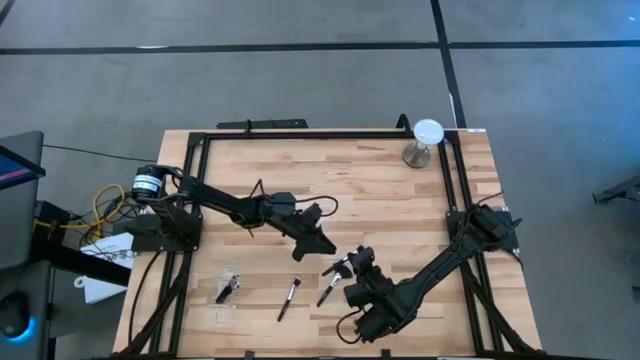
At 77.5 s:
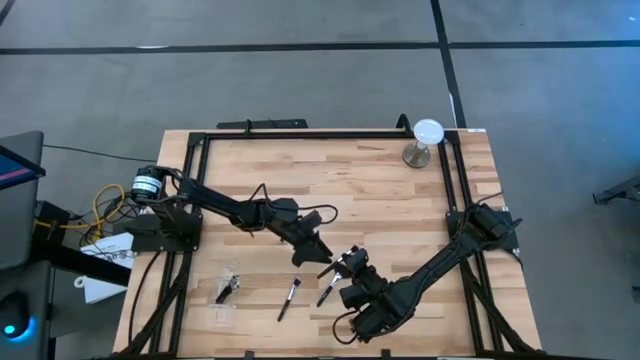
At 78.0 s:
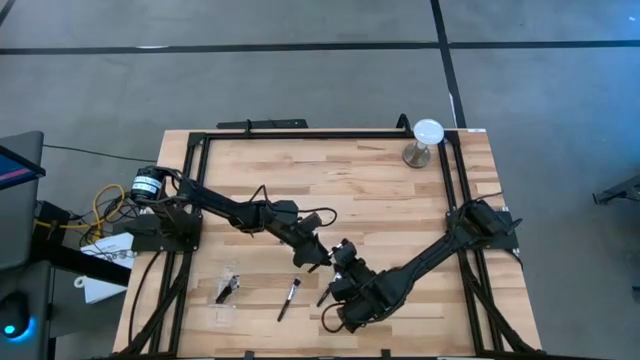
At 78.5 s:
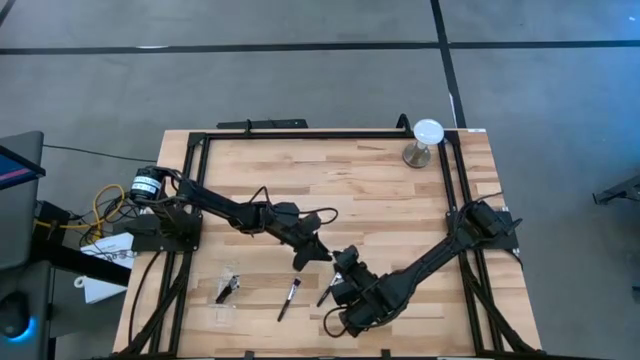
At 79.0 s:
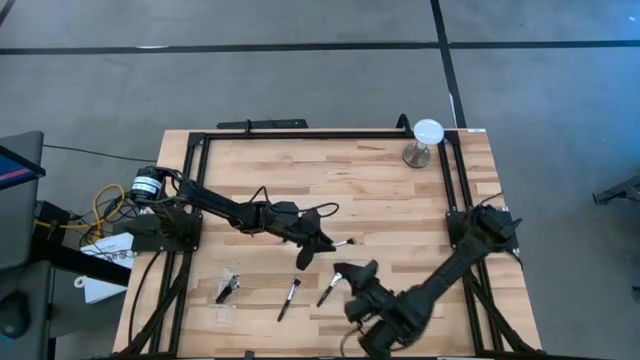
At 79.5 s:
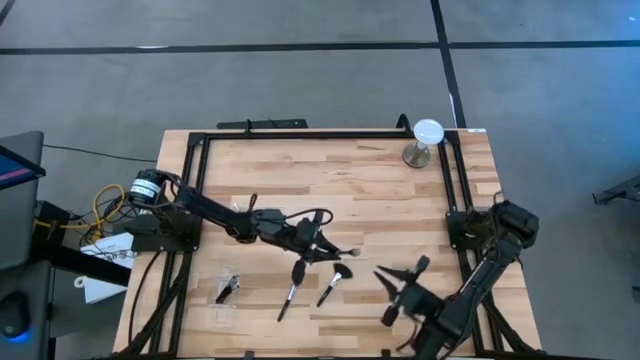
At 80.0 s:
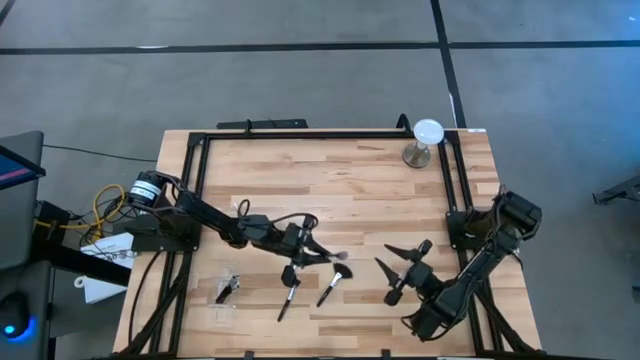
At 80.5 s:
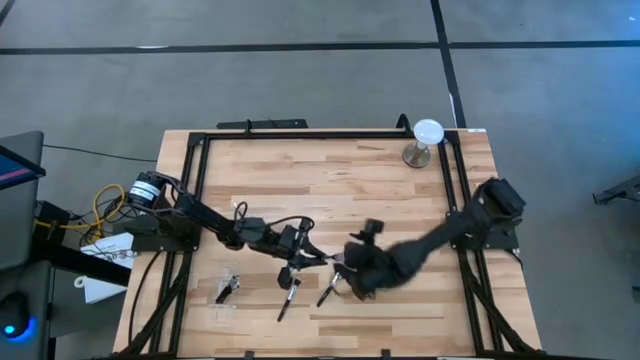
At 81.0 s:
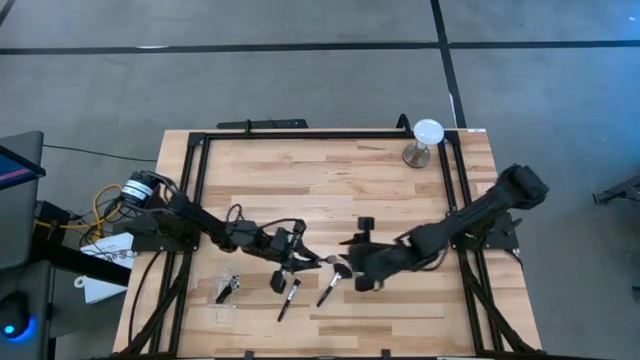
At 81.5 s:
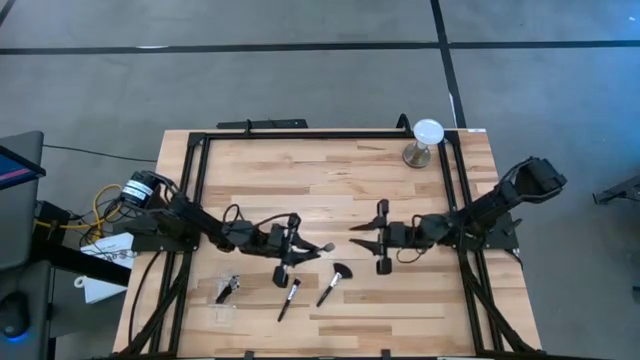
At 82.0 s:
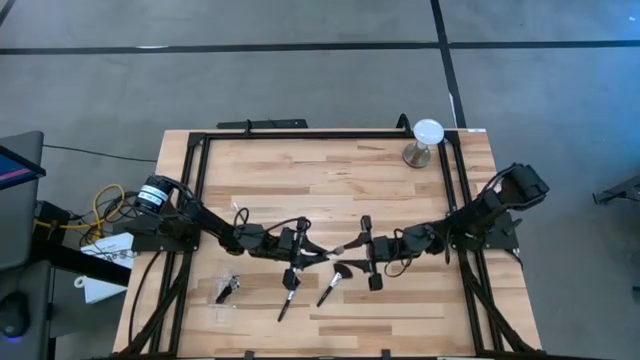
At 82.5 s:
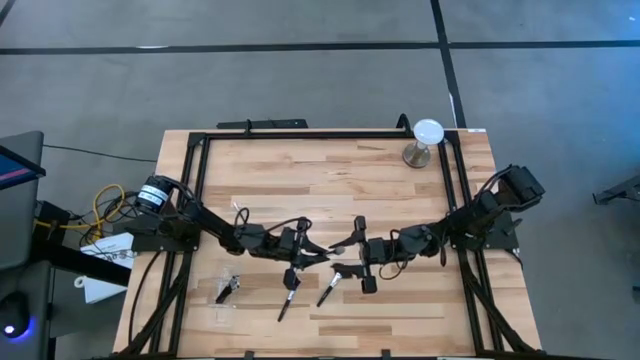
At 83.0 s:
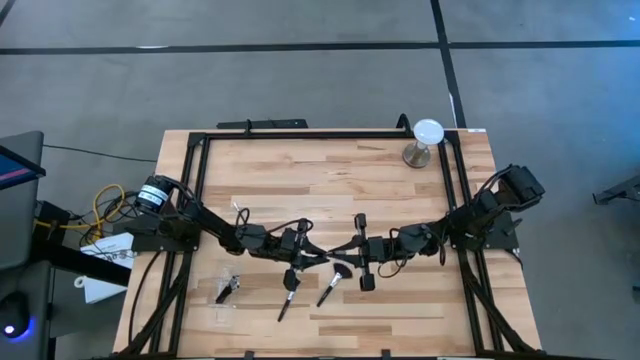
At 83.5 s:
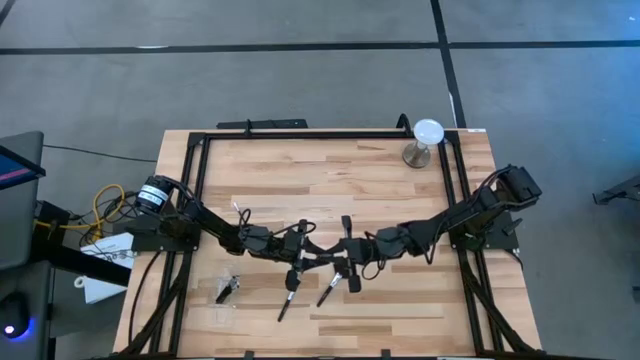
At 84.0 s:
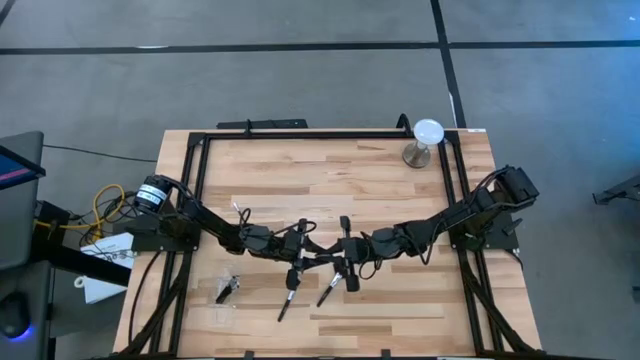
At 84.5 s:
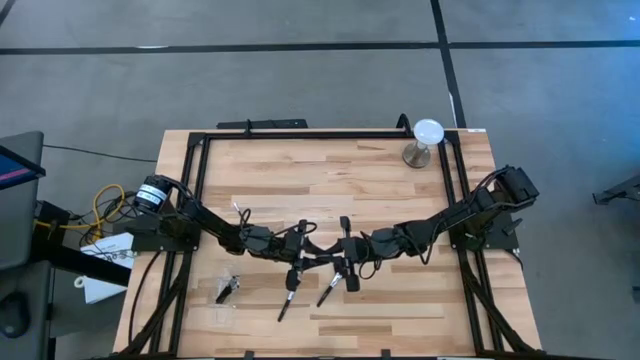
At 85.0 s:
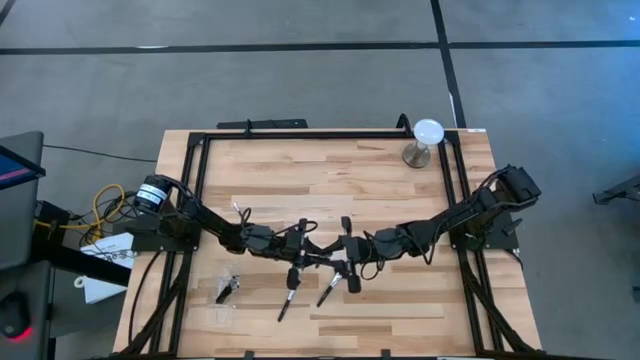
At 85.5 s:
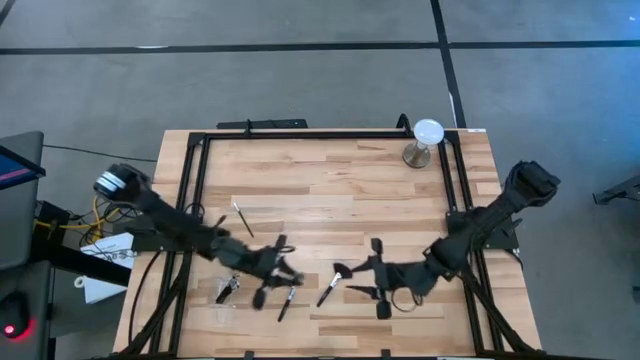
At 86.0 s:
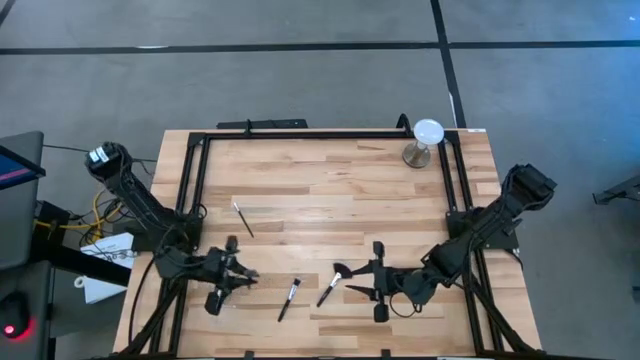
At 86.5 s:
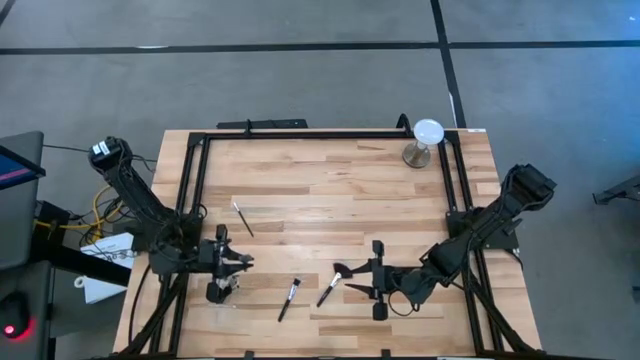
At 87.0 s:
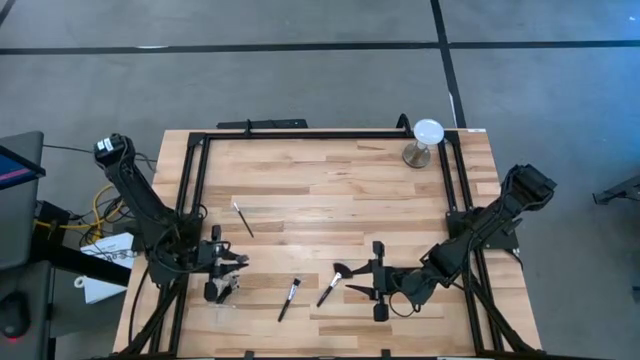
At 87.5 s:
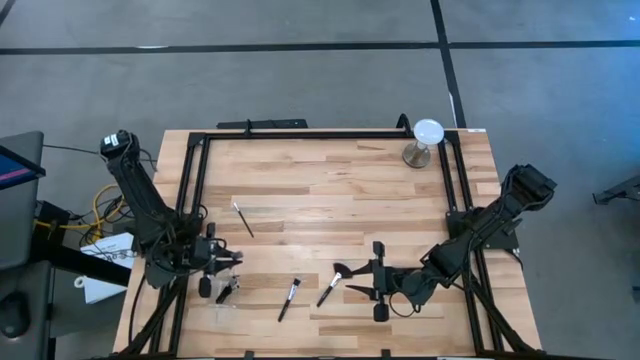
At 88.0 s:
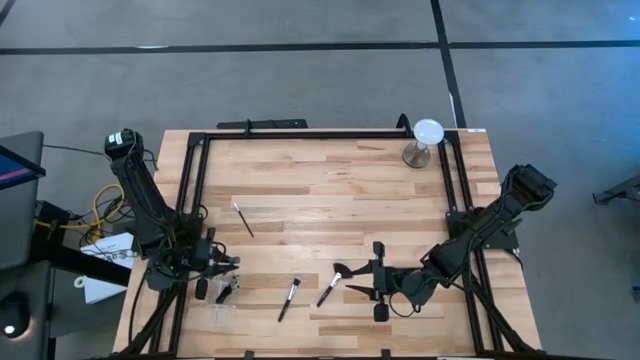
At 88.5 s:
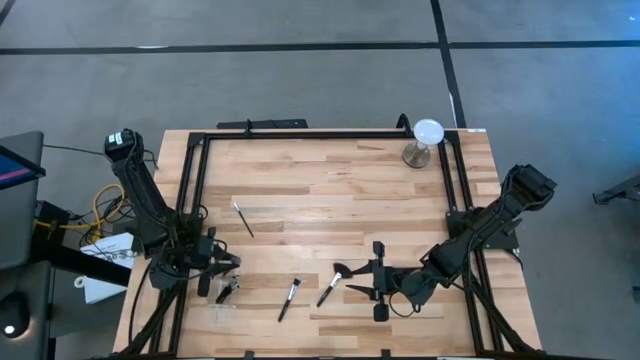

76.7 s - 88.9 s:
Task: Put items in baskets/containers
Put the powder brush into the transparent organizer

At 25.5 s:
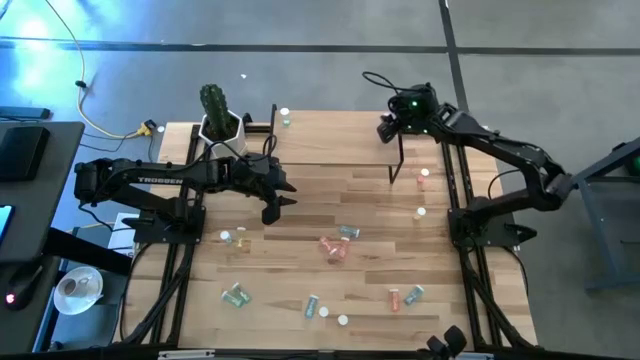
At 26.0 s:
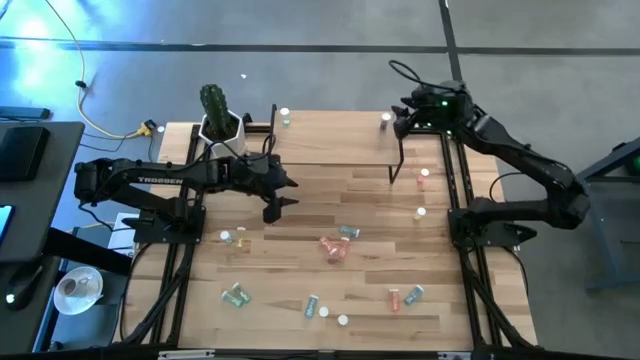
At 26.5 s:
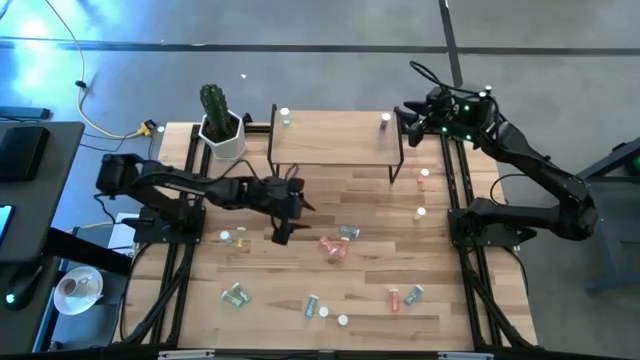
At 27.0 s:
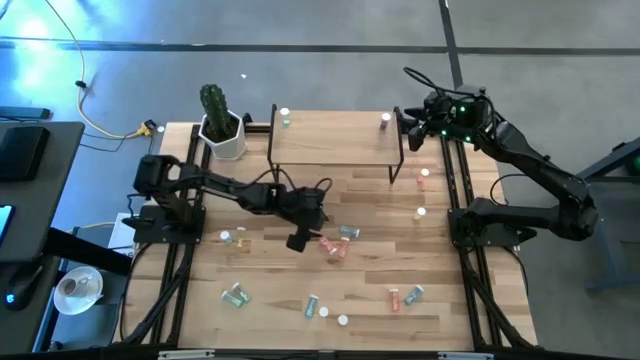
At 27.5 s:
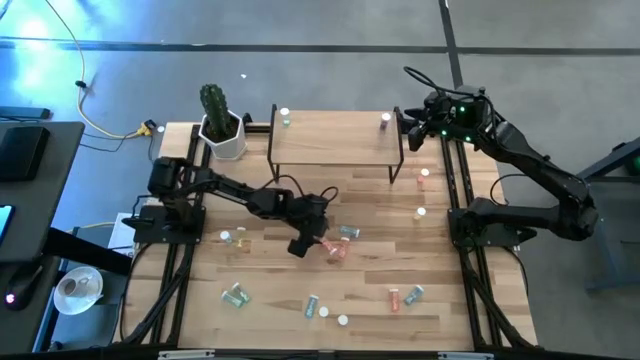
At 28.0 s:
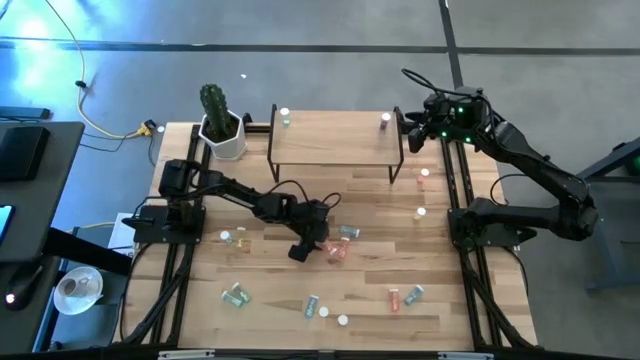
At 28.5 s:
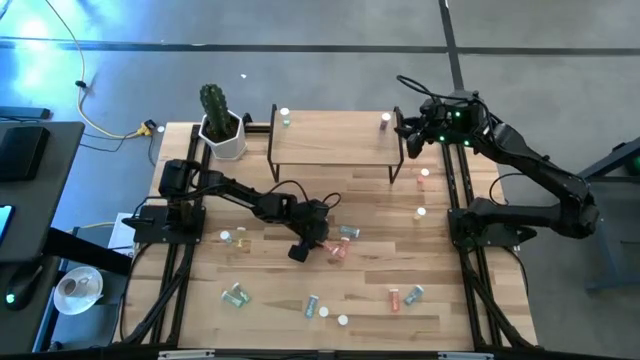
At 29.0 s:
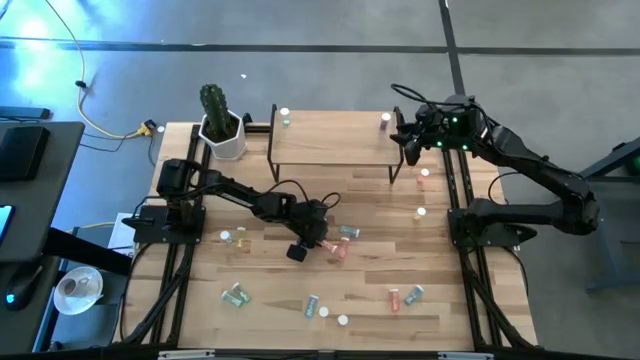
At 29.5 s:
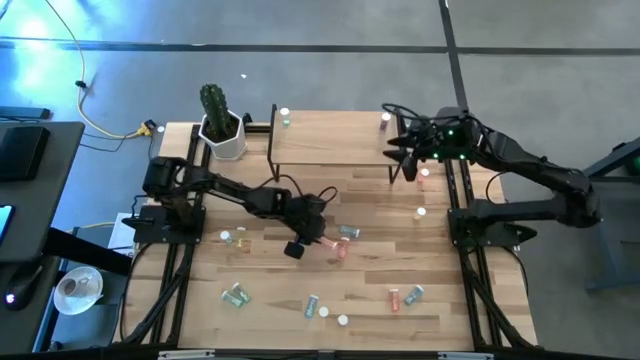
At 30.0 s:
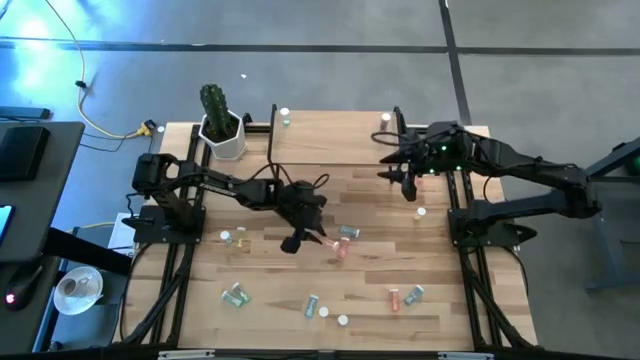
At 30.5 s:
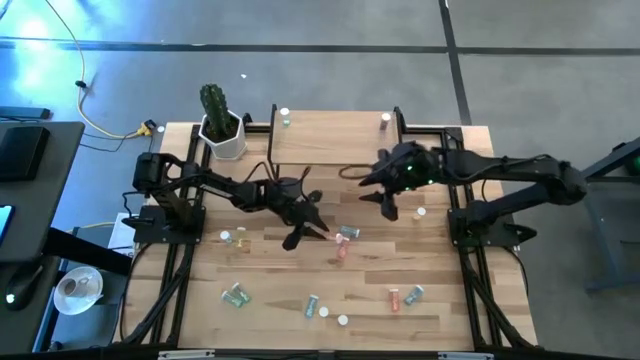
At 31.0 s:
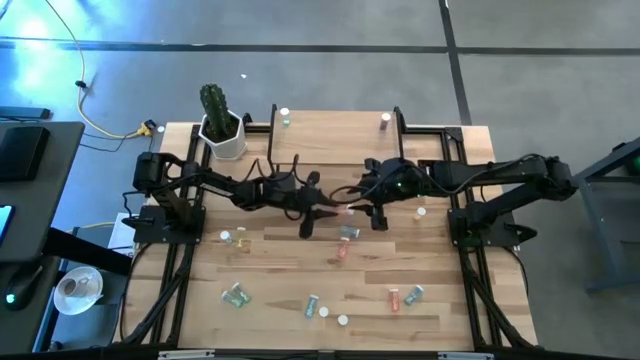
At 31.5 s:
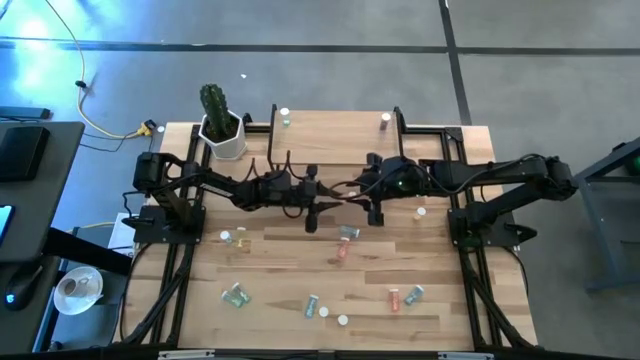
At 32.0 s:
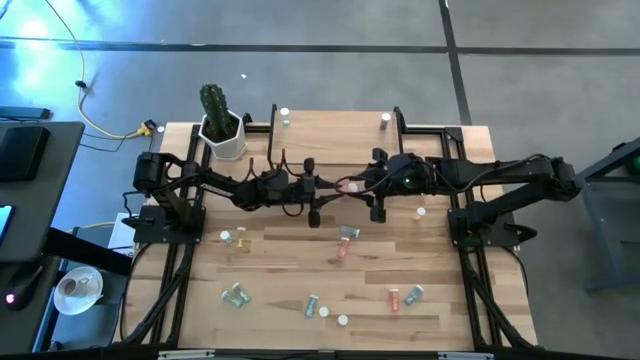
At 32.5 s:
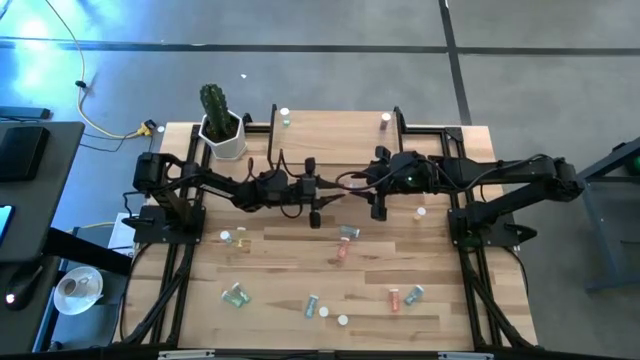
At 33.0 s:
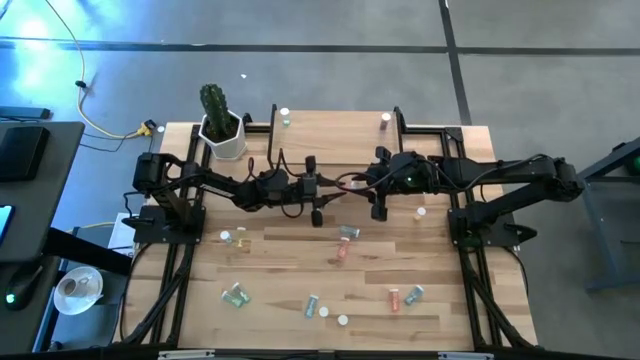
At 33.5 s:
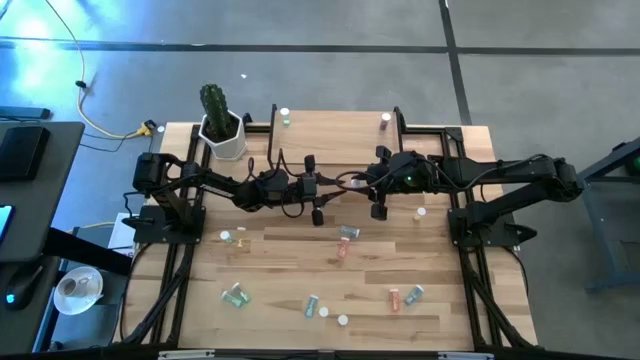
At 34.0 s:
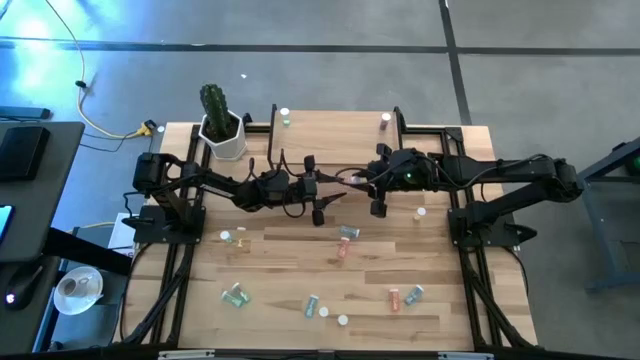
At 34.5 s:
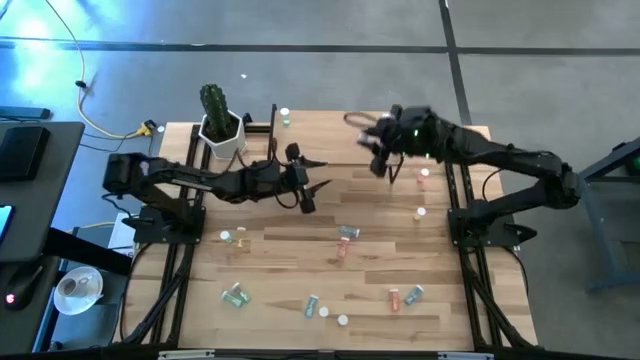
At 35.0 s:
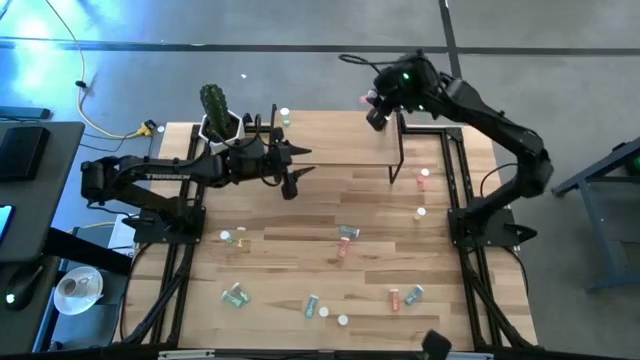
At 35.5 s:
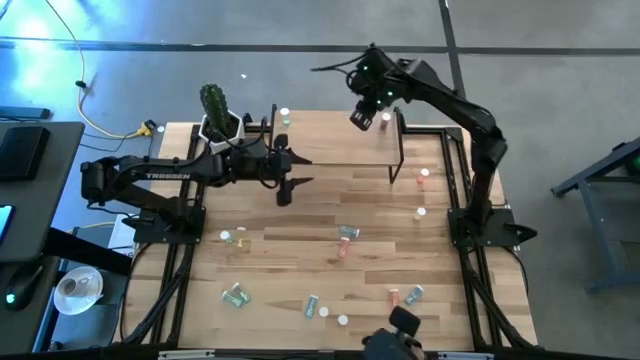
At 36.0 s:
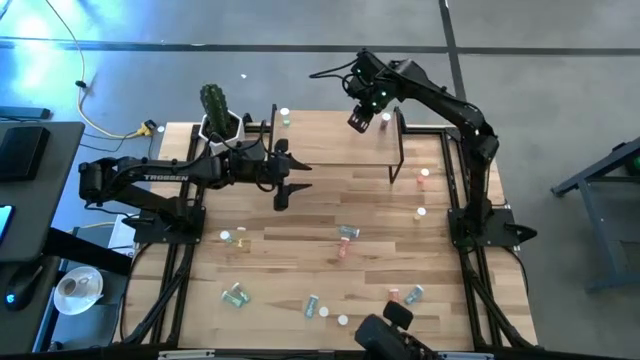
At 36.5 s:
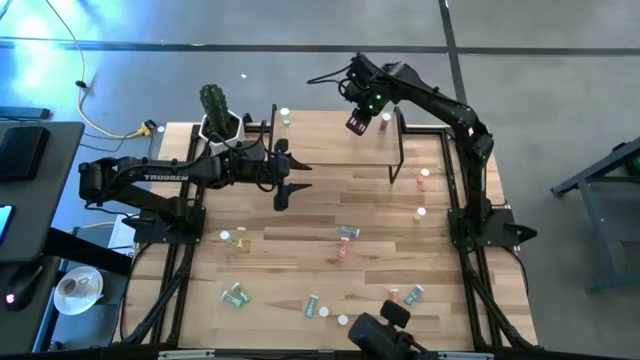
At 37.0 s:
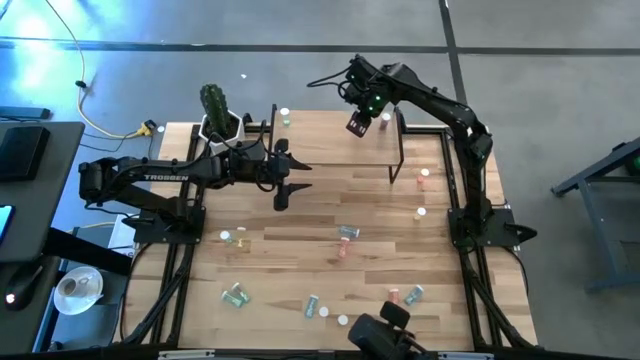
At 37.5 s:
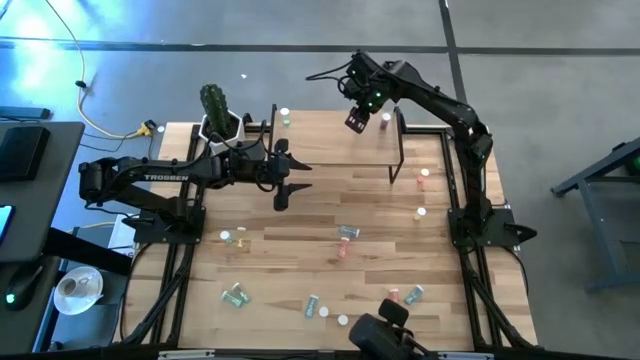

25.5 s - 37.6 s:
Task: Pick and place medicine bottles onto shelf by color
Put the orange pill bottle on the shelf
